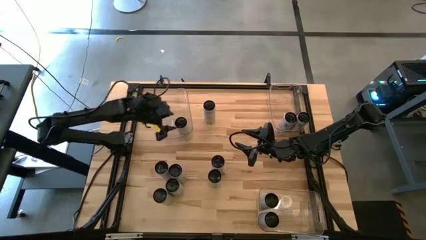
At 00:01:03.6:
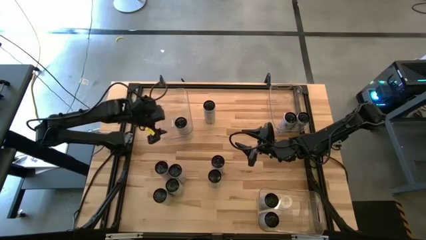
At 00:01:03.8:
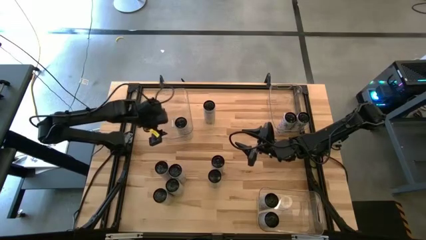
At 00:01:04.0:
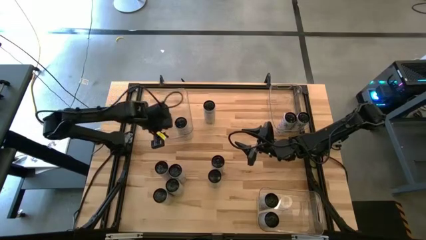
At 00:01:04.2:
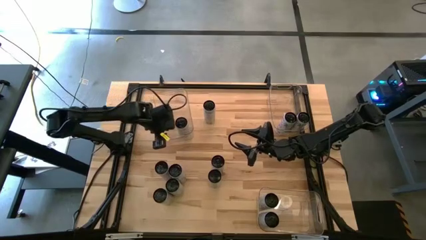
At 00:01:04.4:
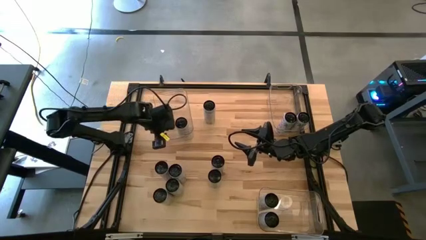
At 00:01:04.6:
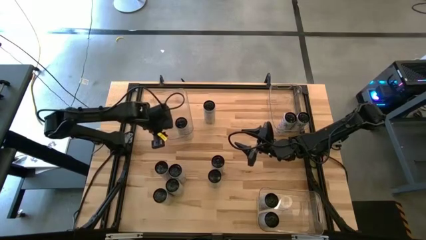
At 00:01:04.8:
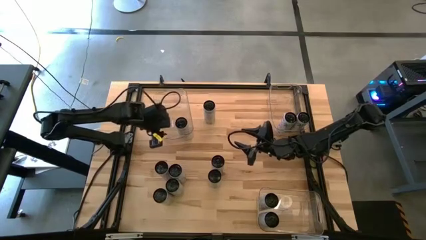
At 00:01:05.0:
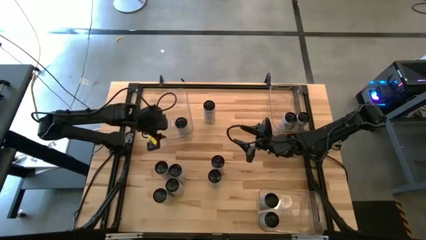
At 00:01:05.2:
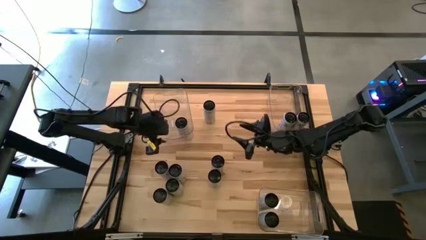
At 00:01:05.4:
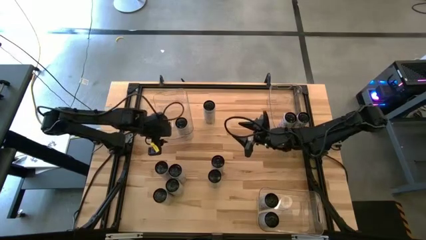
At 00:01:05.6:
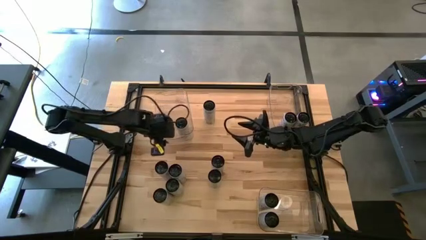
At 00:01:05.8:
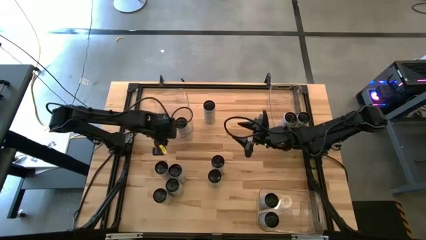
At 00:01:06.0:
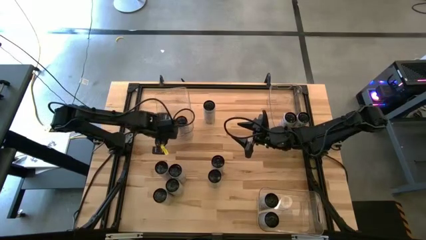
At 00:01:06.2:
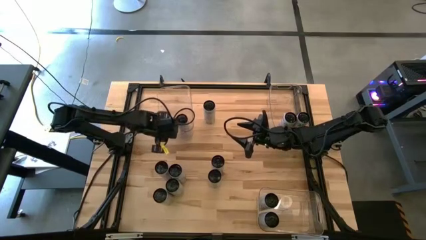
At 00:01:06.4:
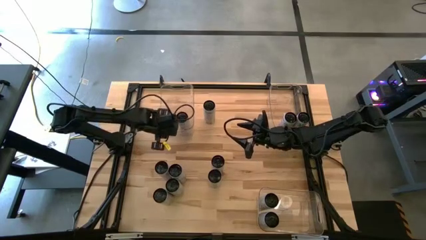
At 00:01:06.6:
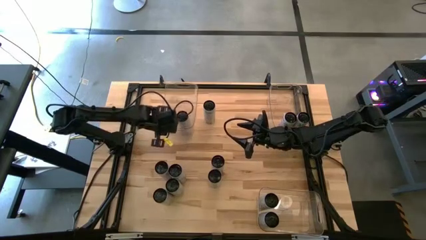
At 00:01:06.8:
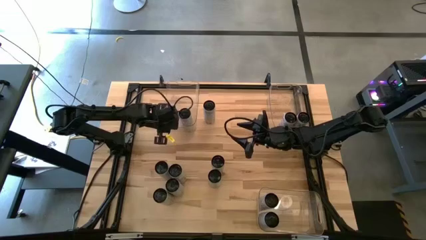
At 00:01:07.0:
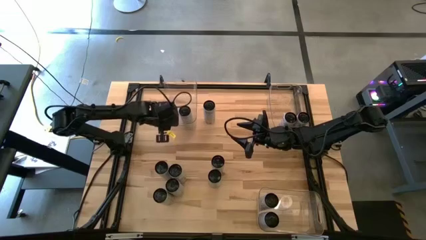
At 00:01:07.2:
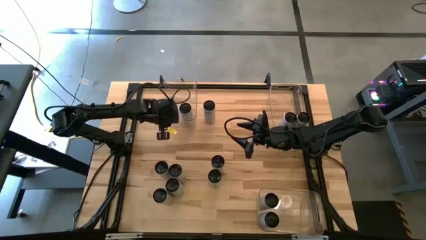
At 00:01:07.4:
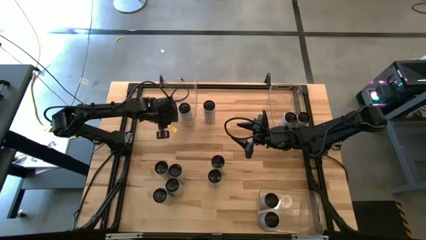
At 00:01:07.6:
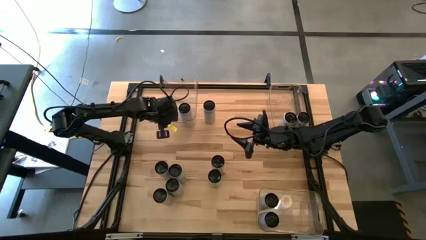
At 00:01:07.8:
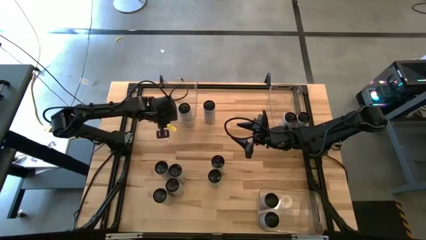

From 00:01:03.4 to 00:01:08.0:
Task: Sort soda cans
Adjust the top left transparent bin

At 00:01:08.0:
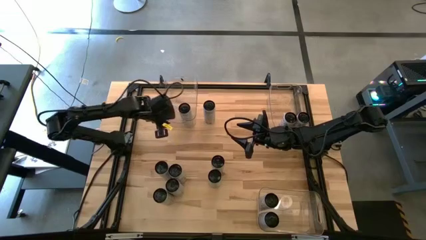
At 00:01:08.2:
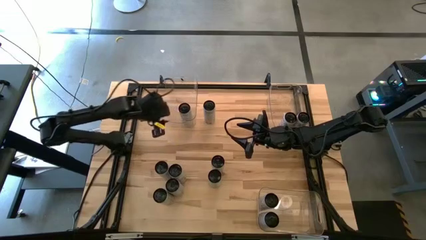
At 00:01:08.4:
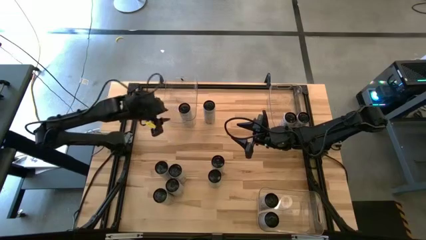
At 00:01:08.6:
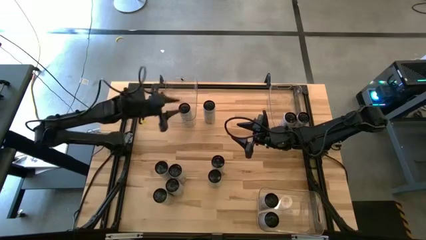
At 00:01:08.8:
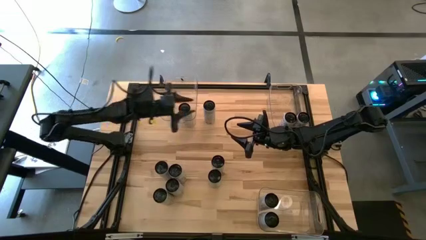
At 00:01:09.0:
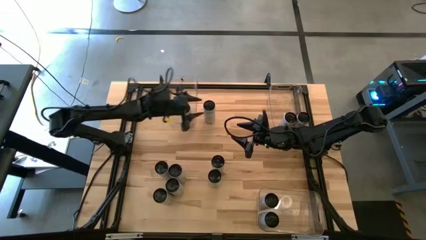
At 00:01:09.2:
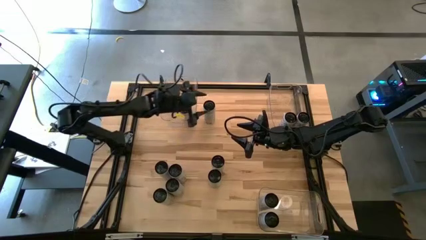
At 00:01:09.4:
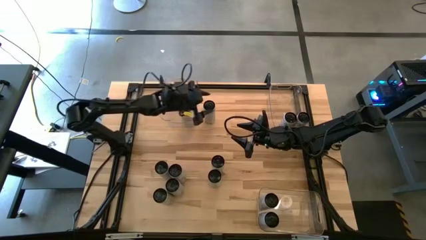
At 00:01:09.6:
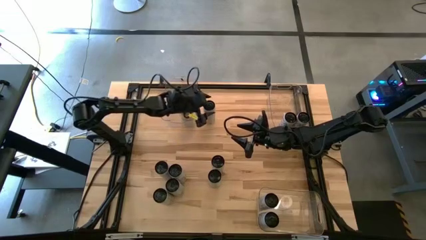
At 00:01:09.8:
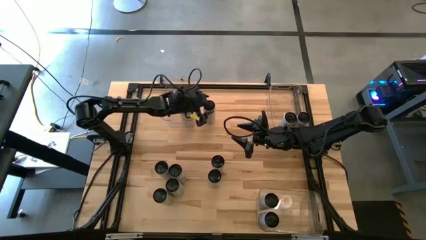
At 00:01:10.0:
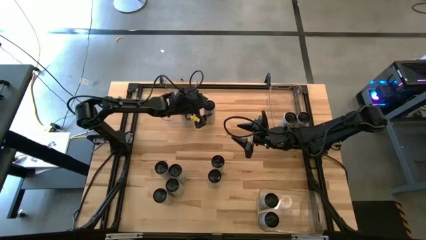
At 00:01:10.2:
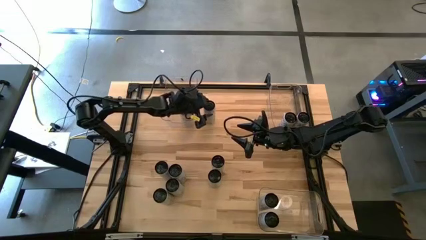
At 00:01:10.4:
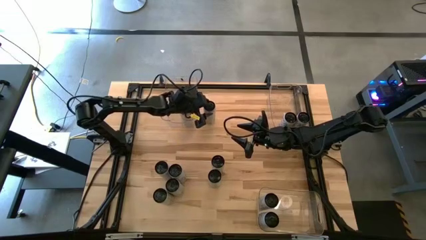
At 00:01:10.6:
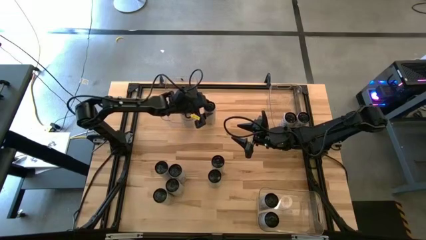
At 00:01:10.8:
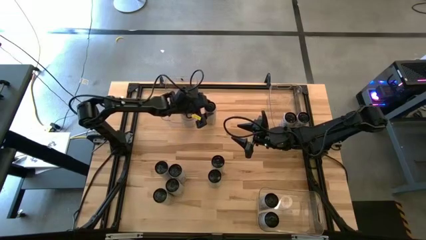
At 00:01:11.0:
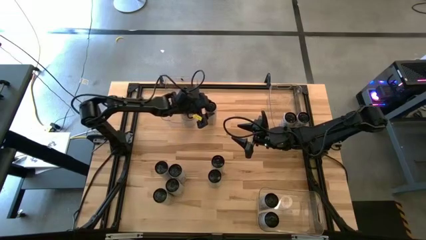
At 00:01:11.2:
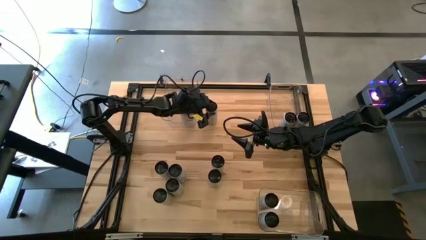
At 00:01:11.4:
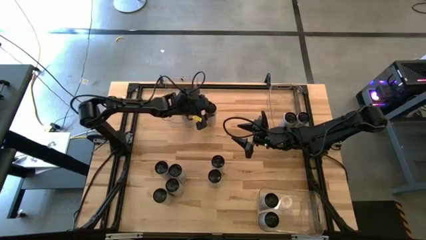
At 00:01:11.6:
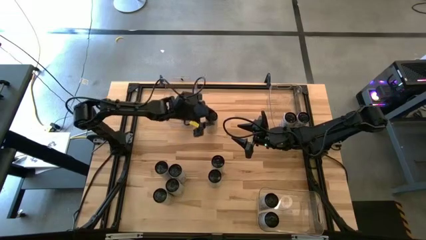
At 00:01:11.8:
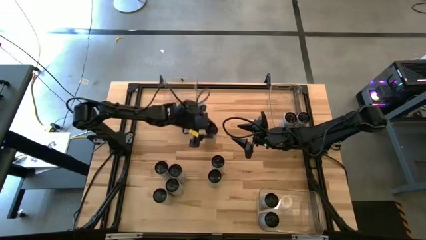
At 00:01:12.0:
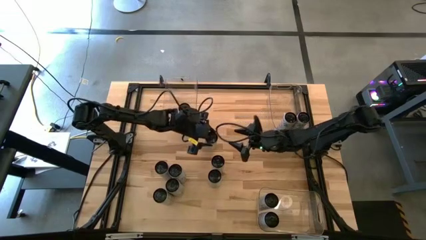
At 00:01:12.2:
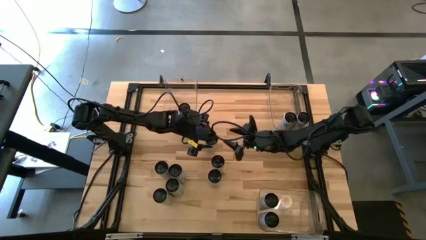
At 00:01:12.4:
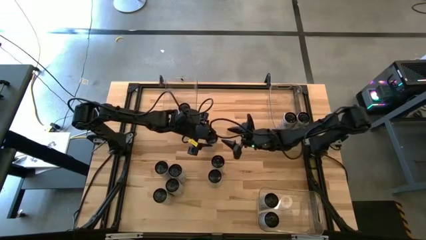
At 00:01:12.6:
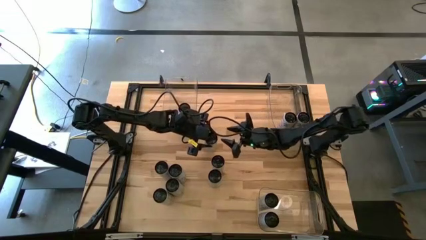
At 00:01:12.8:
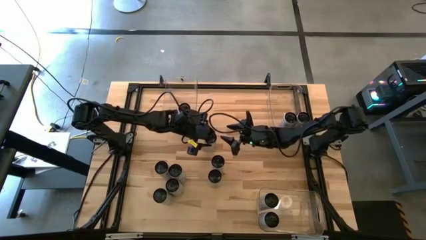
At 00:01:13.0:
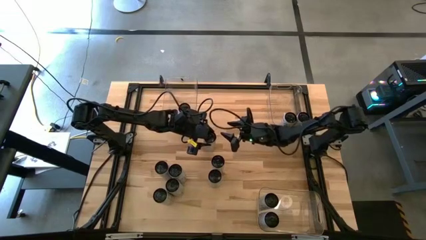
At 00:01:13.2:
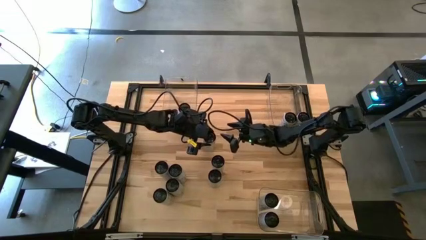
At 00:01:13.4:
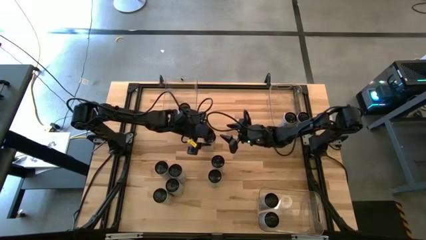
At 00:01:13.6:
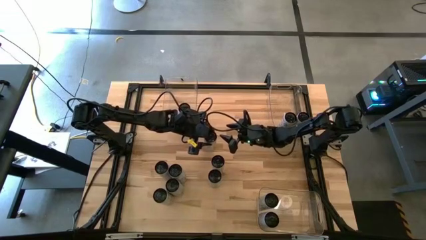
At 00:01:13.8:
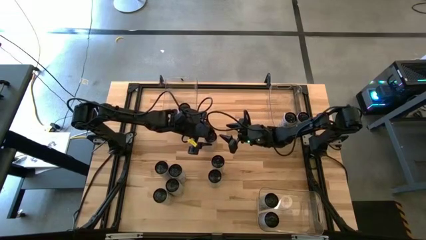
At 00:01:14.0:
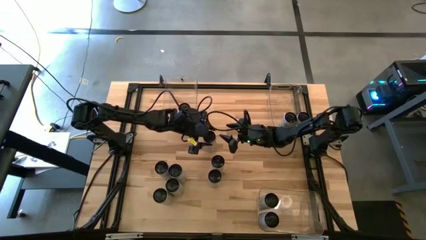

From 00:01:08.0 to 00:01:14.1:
Put the white/yellow soda can into the top left transparent bin

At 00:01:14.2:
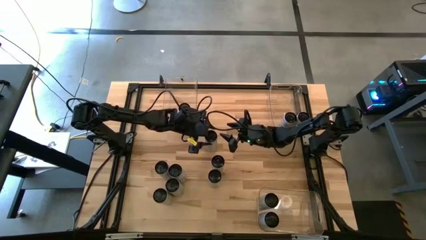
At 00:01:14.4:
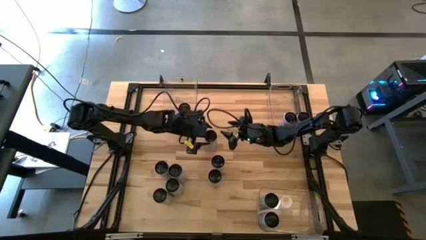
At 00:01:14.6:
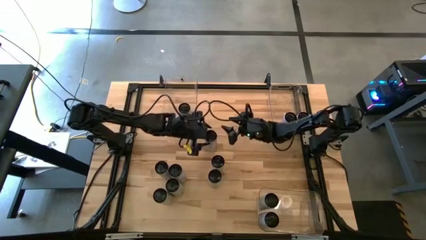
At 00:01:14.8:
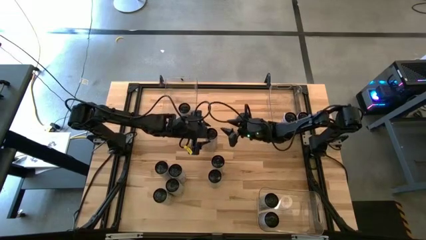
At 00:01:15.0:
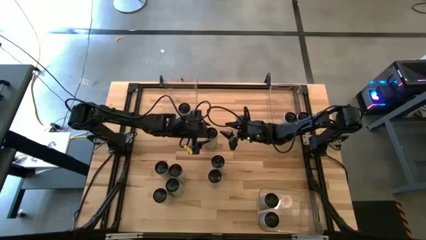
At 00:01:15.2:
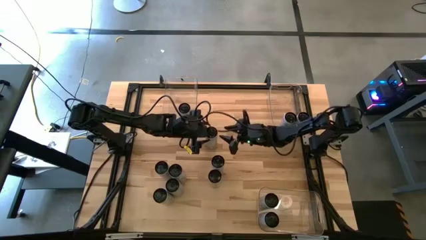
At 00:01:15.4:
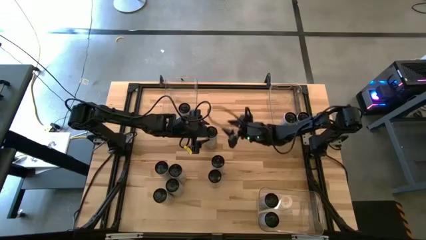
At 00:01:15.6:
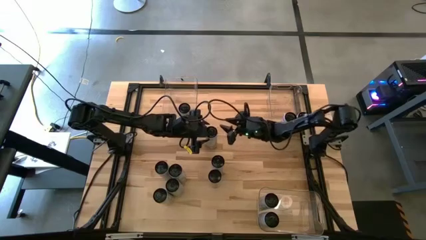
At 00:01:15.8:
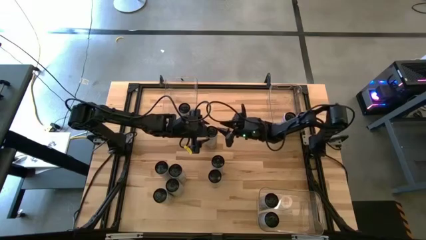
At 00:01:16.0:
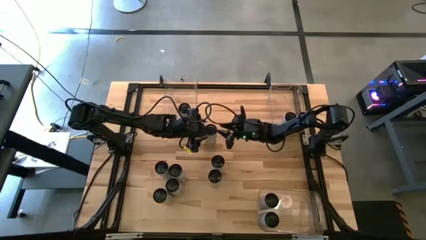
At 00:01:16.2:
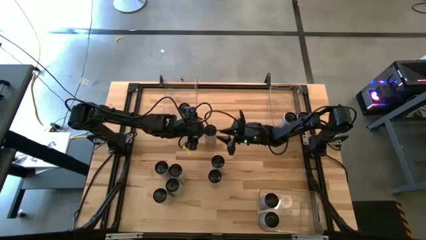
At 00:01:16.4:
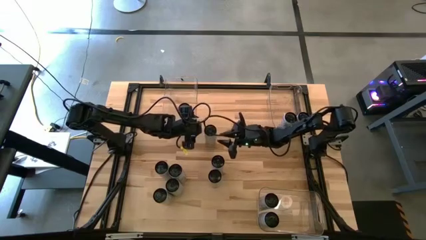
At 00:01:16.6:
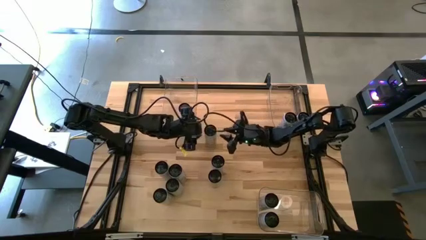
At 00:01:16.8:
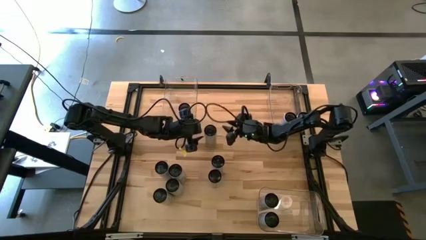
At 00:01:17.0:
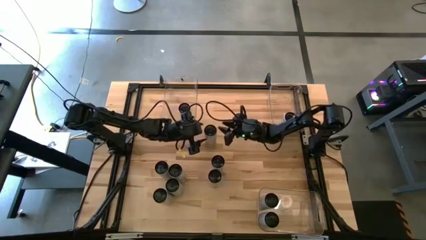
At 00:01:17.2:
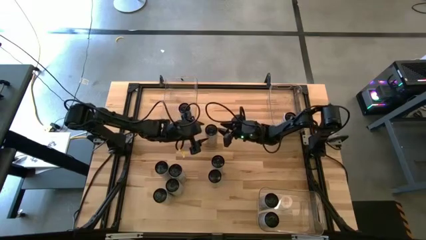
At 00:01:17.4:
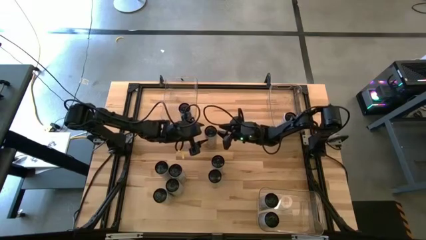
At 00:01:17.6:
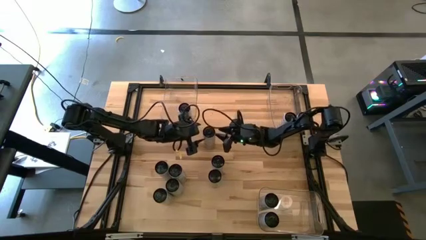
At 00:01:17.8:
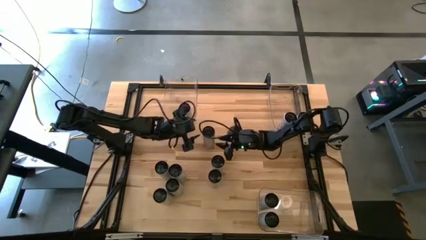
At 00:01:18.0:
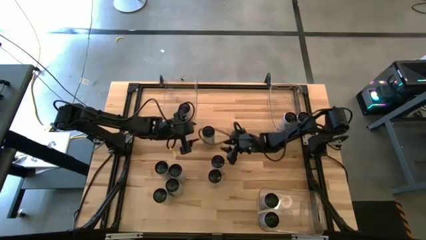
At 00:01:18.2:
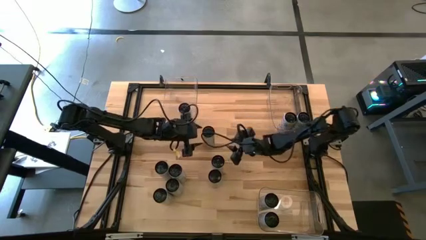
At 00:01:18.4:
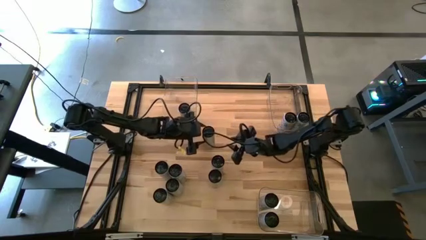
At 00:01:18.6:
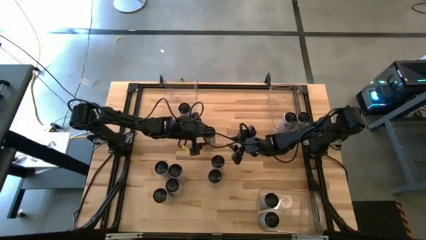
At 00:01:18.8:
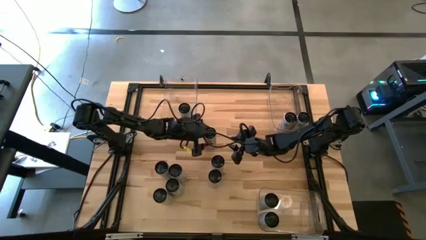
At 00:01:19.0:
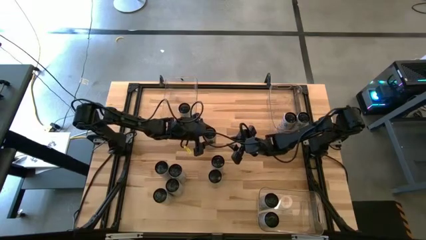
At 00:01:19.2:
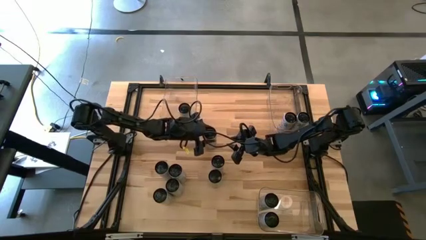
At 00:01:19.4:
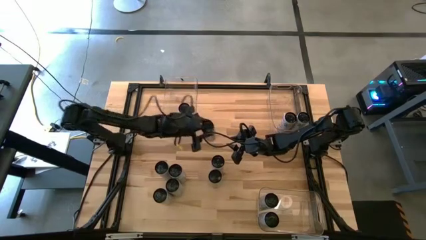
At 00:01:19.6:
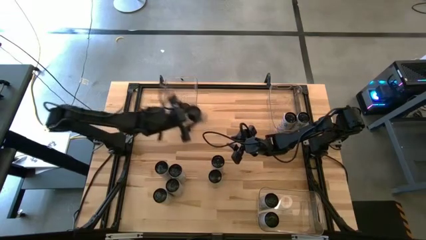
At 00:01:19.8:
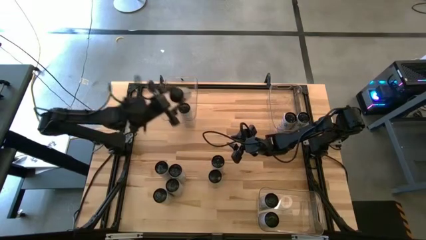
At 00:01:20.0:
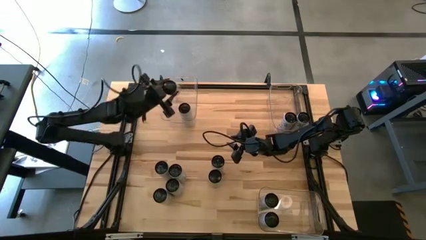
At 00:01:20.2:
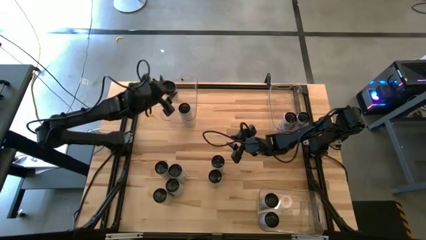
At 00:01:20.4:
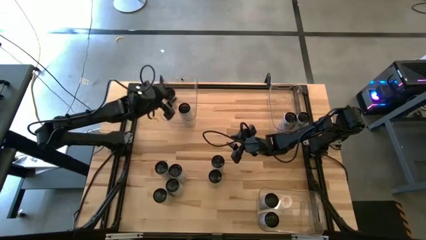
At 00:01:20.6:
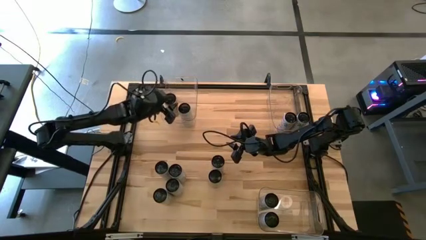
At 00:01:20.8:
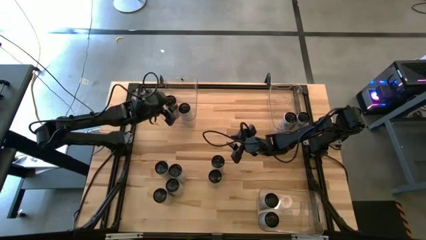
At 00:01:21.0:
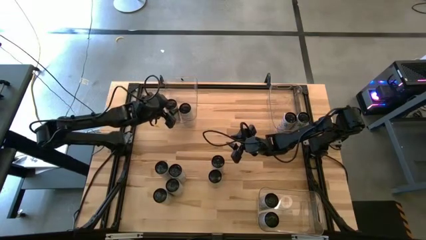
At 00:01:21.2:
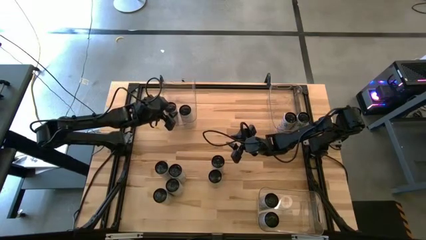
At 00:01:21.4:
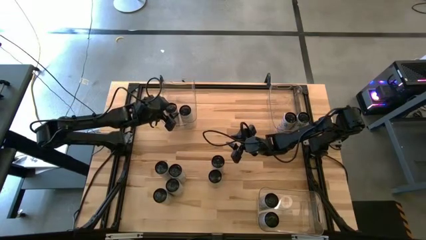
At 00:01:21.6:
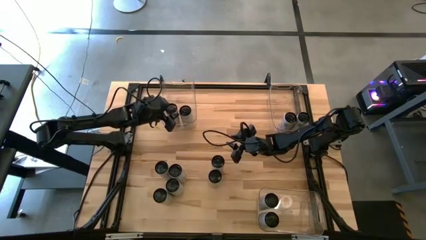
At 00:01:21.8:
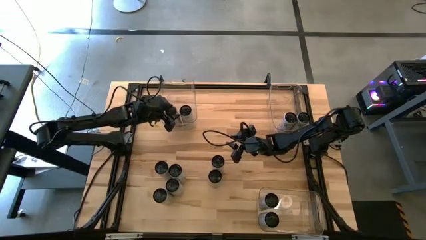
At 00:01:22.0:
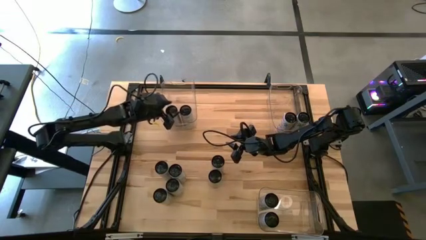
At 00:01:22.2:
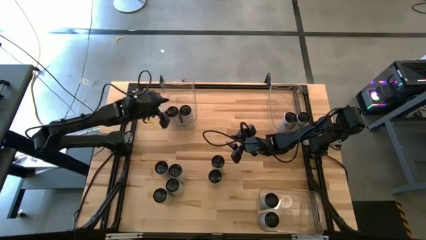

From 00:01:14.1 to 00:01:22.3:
Put the white/yellow soda can into the top left transparent bin
